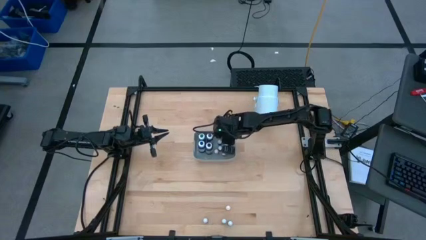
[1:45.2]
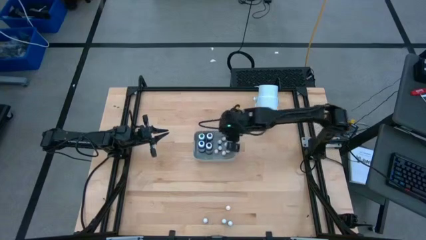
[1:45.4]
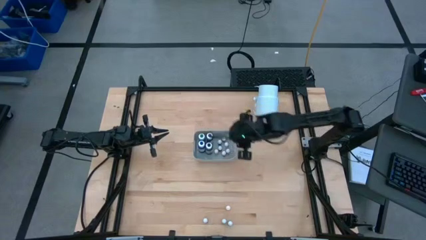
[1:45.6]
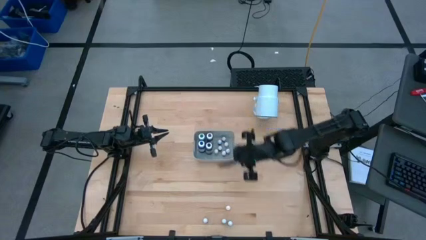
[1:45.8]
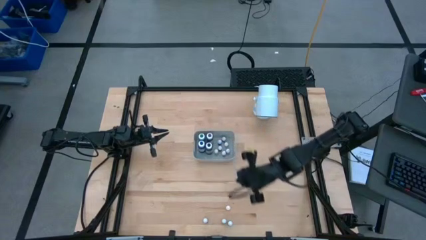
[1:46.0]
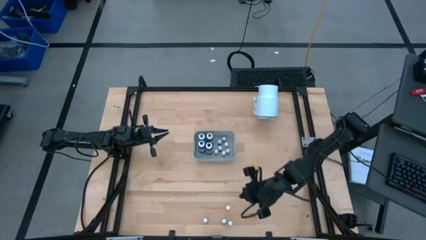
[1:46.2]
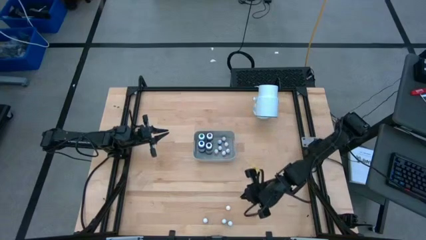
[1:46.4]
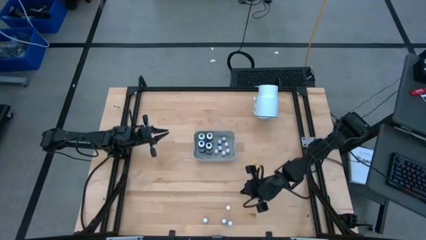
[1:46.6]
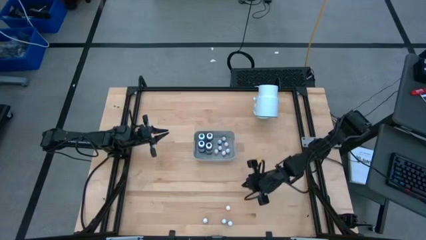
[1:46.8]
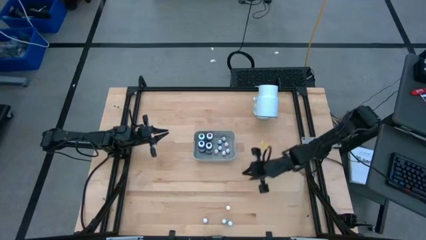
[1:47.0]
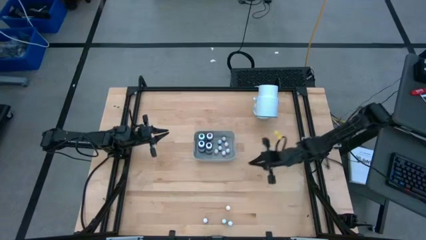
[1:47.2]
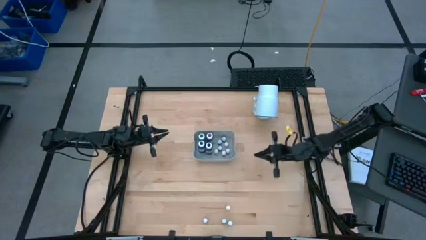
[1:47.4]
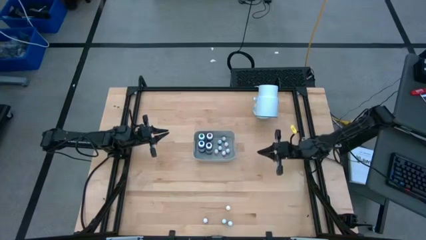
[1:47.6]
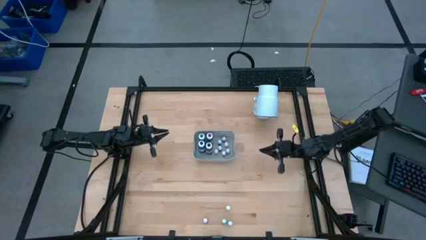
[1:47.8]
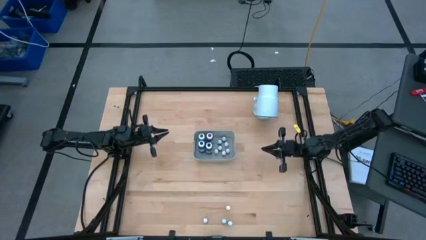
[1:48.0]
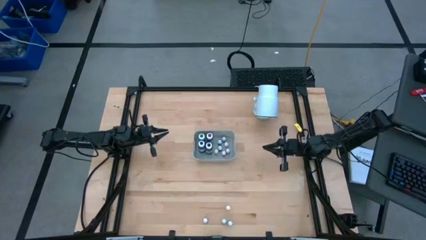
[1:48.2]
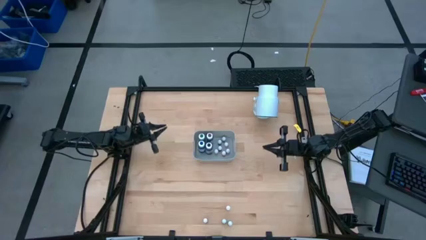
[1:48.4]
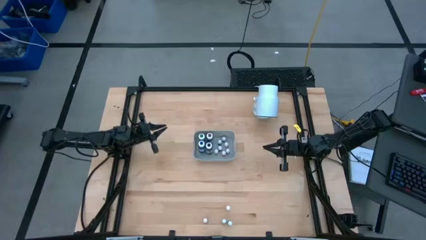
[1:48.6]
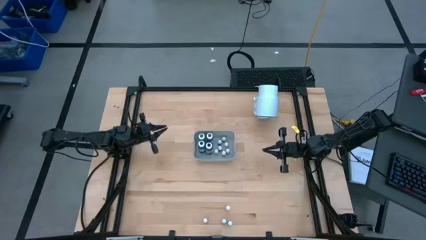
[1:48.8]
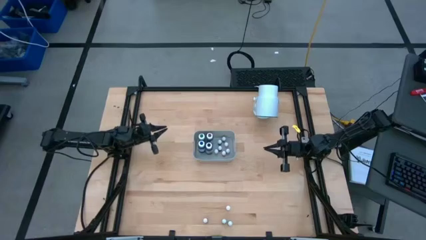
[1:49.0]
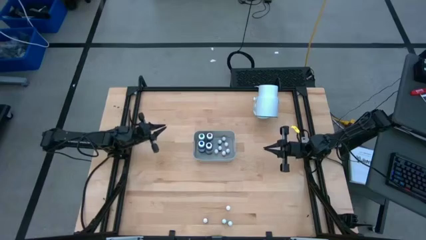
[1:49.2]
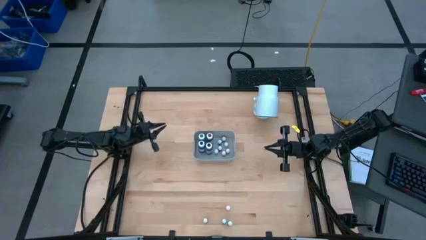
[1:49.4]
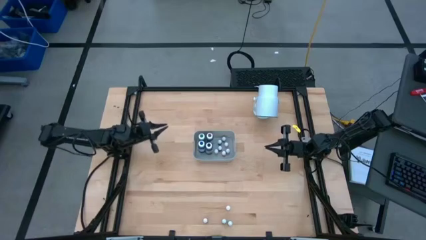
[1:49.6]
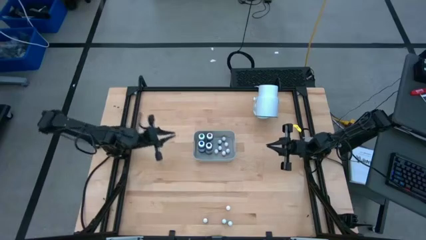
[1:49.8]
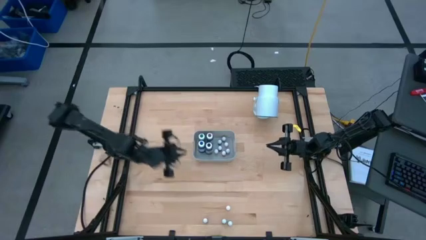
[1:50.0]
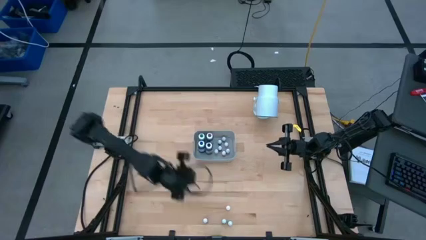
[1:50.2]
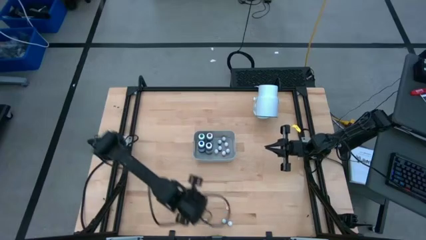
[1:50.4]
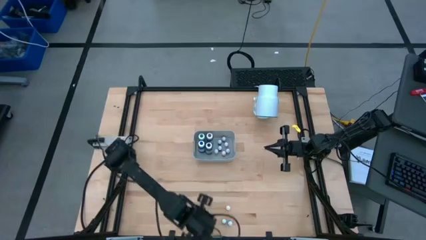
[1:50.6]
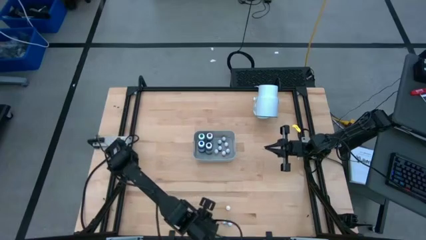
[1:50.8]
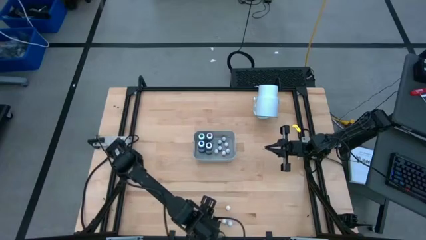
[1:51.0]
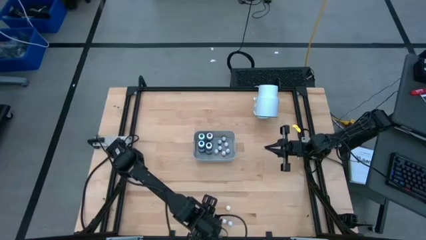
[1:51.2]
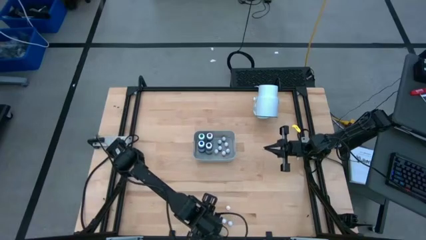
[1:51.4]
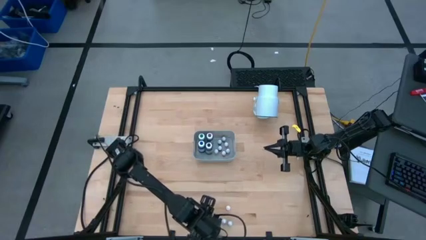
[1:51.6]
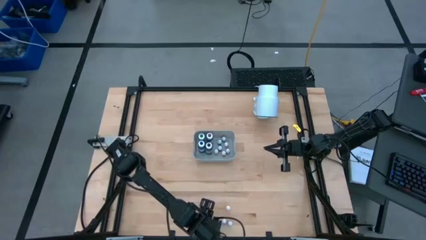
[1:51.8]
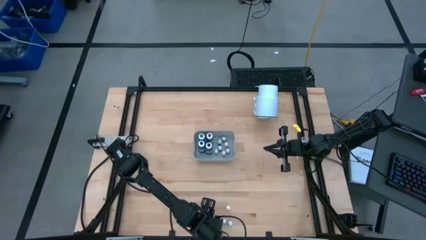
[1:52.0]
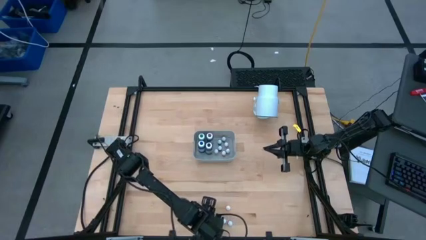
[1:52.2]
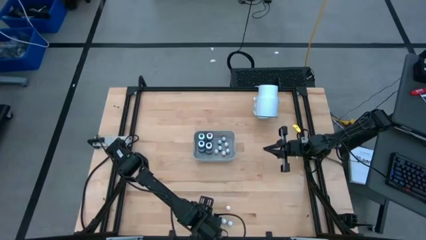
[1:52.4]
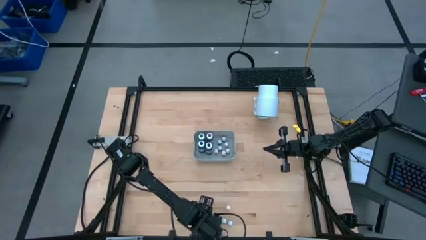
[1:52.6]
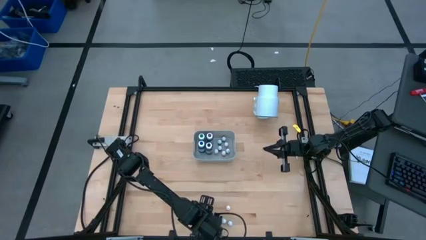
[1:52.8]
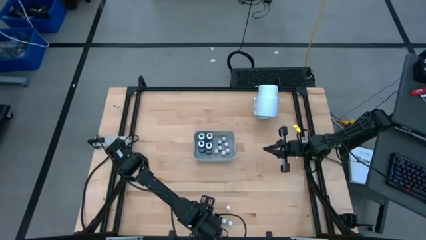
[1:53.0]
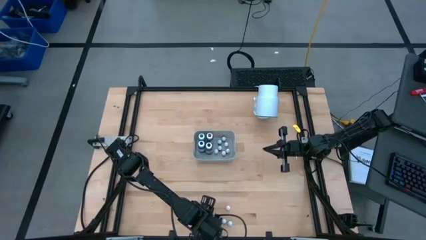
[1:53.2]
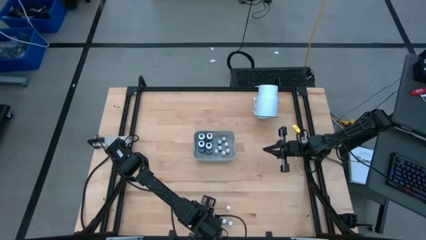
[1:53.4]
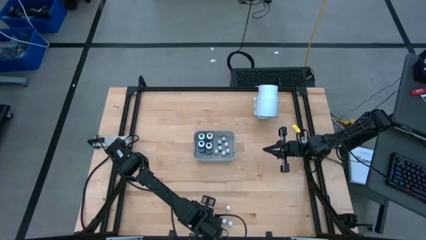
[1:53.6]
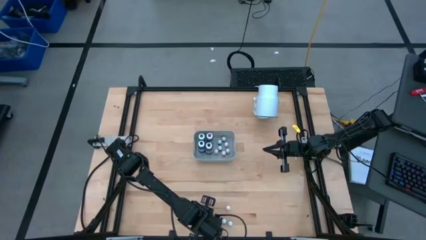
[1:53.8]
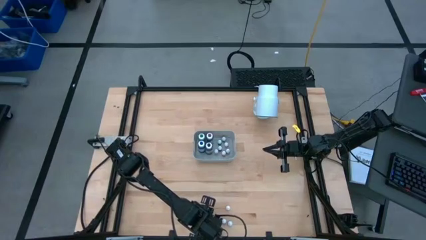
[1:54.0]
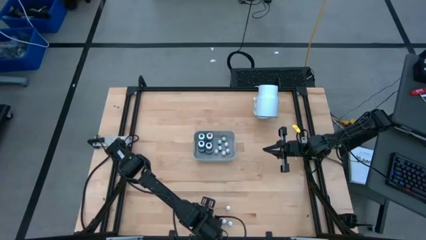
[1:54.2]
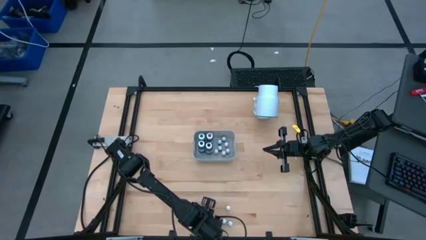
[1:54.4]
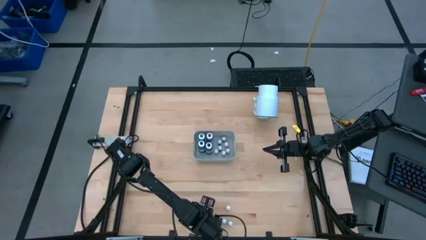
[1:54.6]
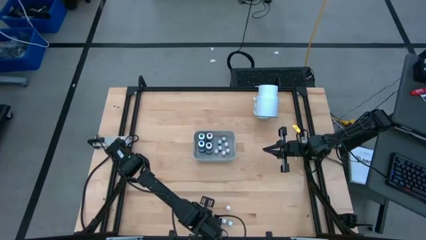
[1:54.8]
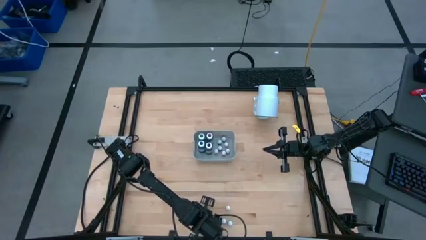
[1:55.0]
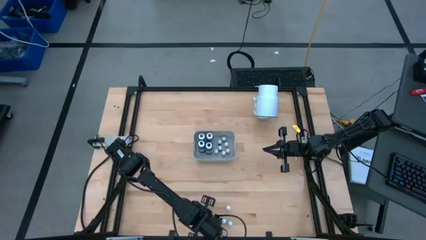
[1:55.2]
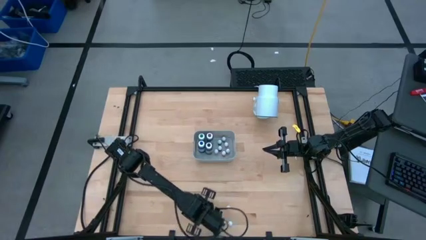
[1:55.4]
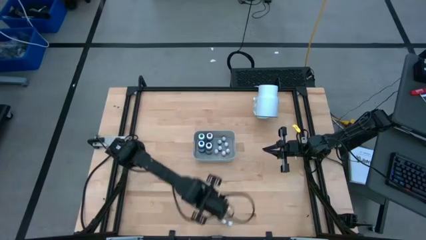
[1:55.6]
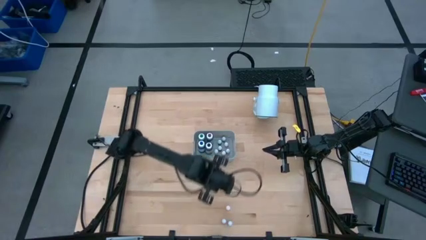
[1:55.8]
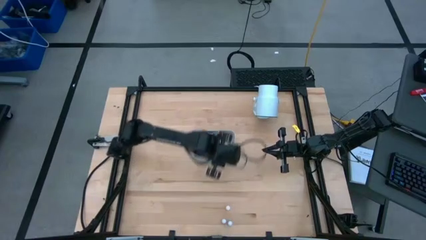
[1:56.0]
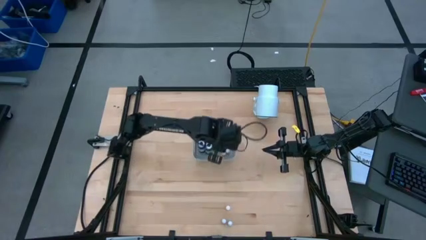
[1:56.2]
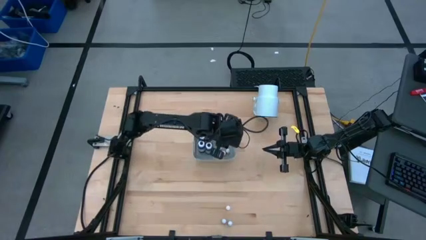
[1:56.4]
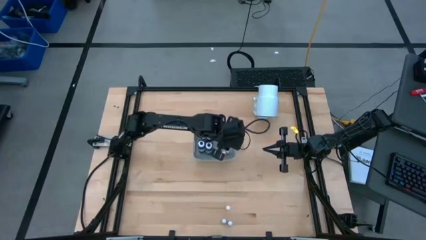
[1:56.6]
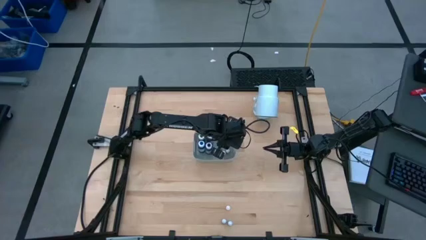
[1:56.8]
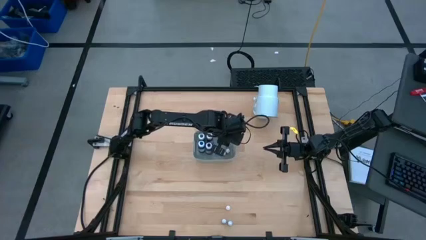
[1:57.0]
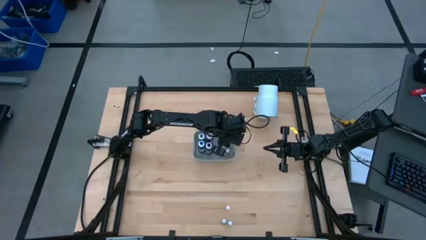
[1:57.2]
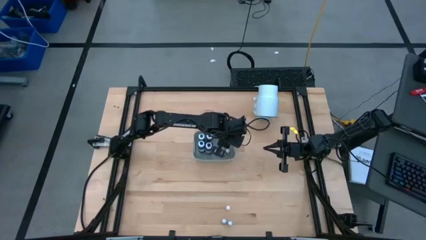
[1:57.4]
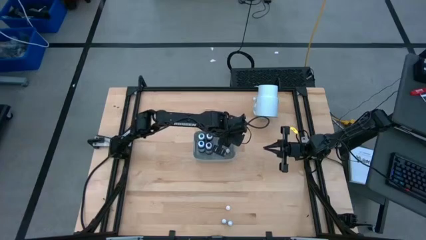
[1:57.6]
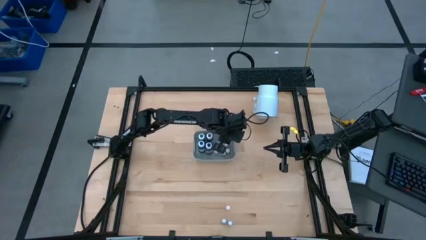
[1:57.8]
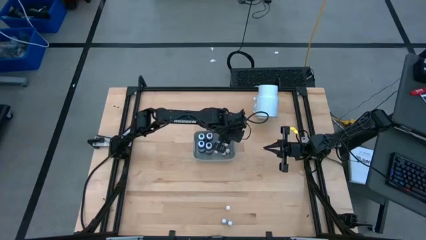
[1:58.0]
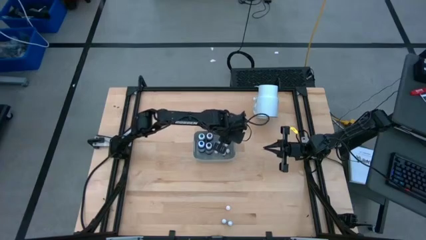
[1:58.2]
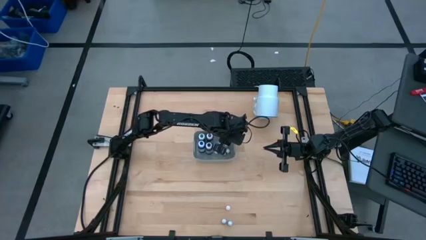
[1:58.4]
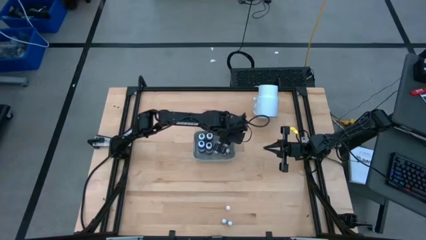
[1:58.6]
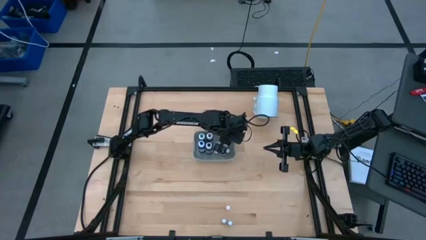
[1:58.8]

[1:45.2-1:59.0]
Task: Pick & Place food coloring
Put the small red food coloring bottle into the gray bin

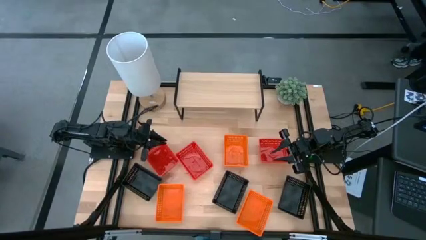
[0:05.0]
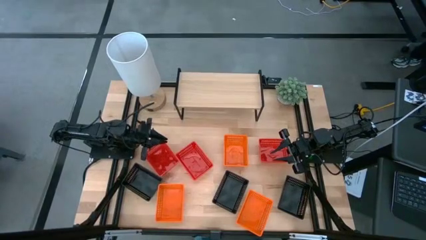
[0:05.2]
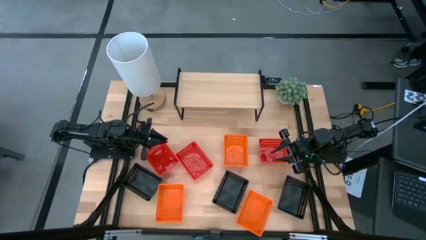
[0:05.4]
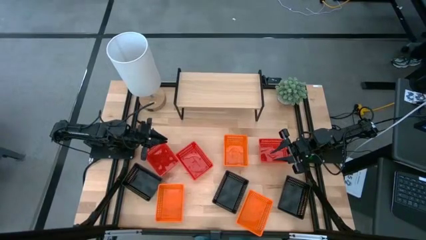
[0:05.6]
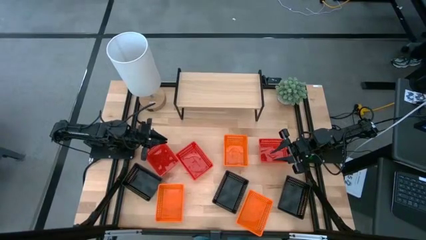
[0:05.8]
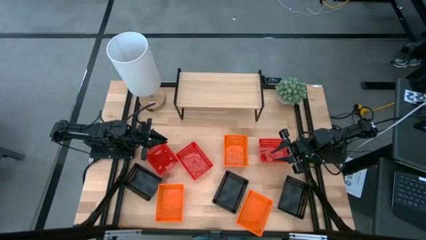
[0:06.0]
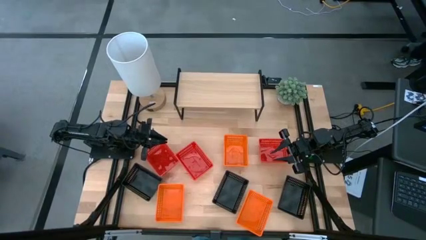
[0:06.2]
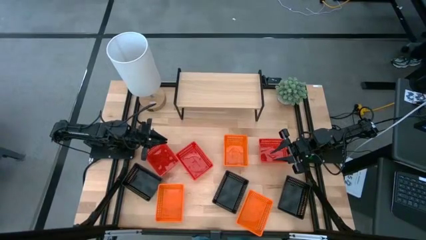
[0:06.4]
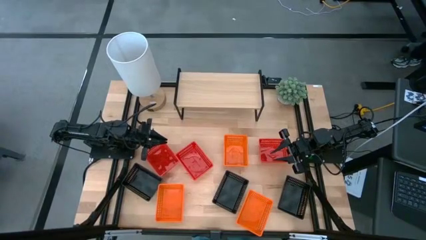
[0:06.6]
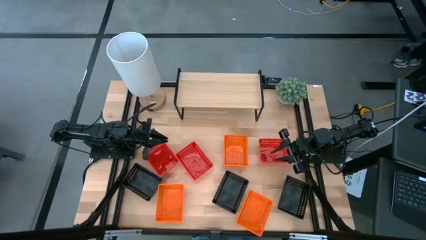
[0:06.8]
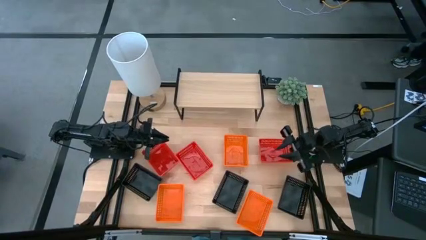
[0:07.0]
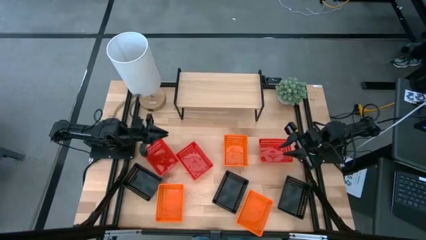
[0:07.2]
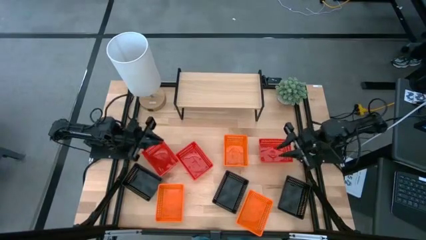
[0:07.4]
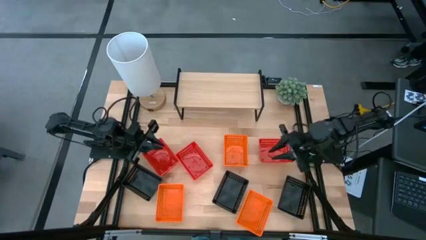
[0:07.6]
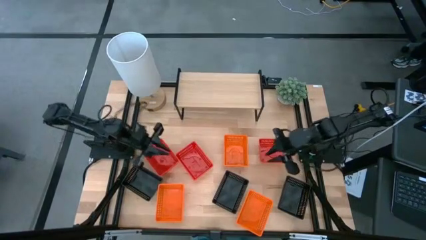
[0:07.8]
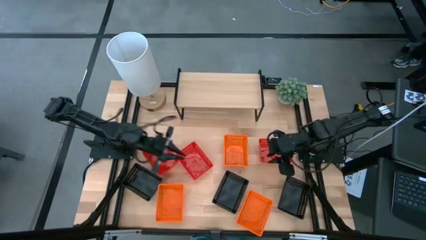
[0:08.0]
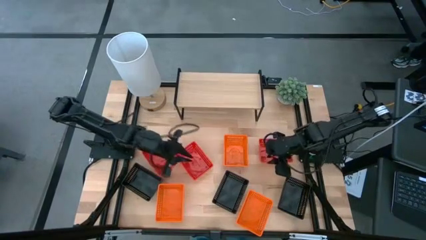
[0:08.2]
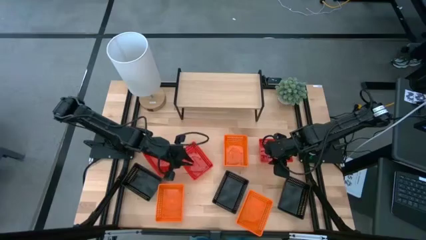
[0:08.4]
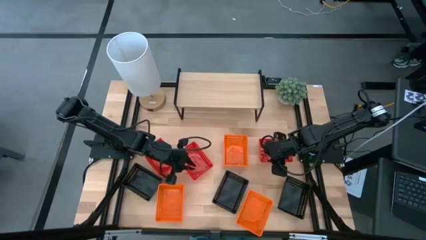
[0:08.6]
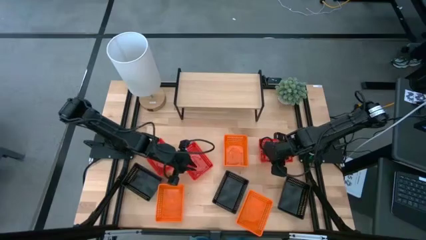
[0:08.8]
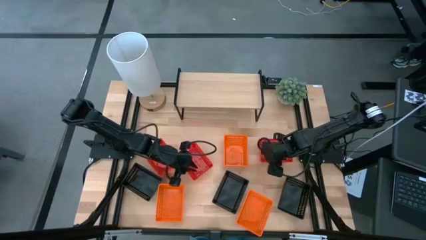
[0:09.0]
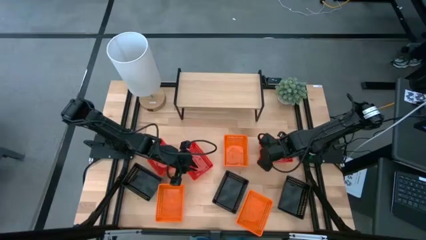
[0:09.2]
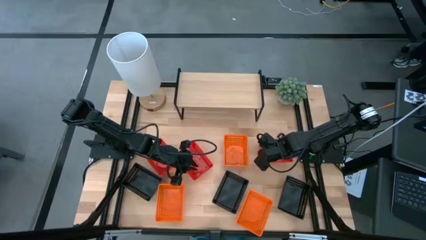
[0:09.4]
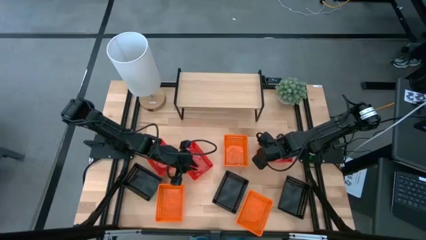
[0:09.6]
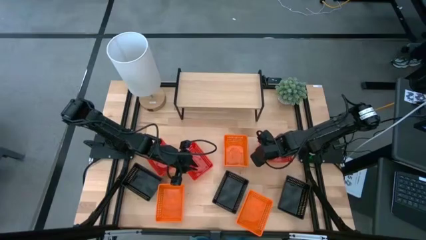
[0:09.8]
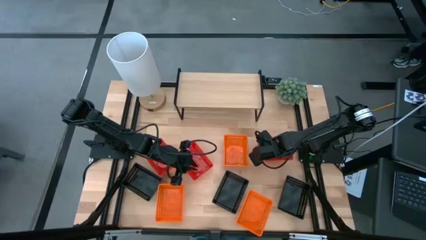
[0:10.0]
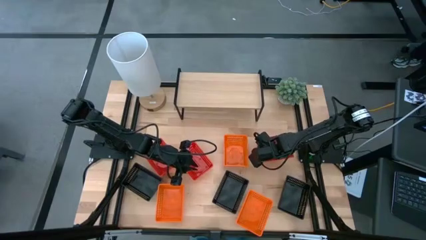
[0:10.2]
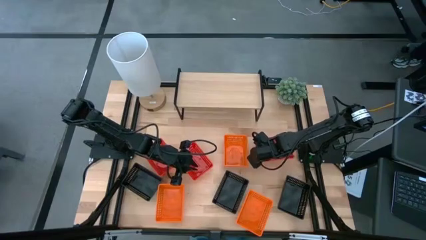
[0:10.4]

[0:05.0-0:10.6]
Task: Stack baskets on shelf by color
Put the right red basket on the shelf
